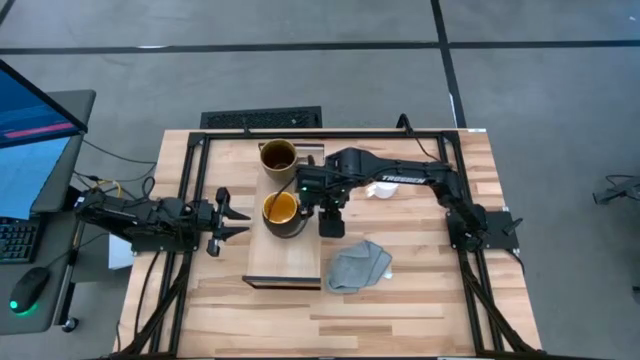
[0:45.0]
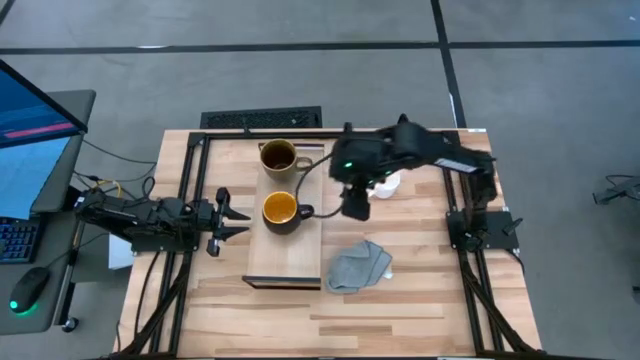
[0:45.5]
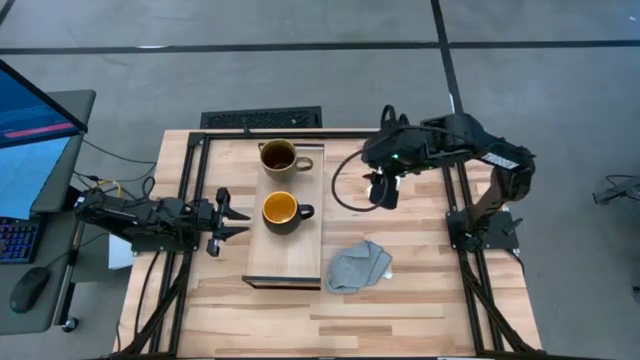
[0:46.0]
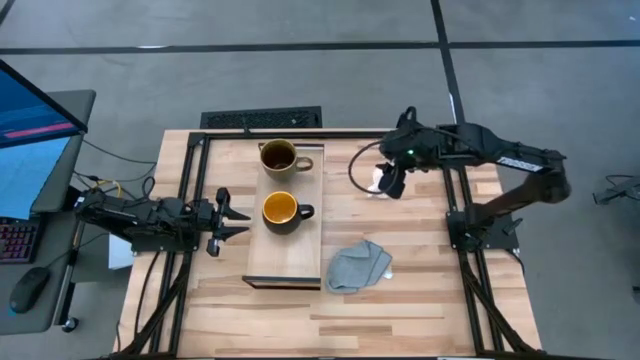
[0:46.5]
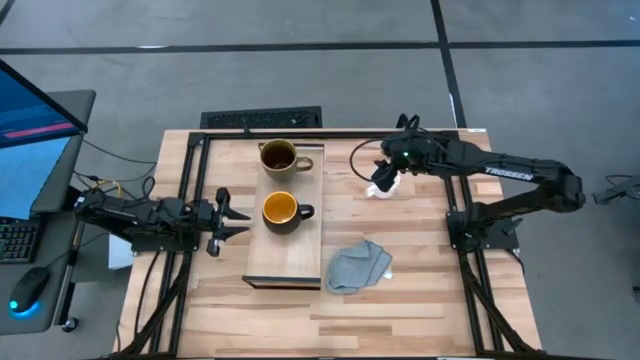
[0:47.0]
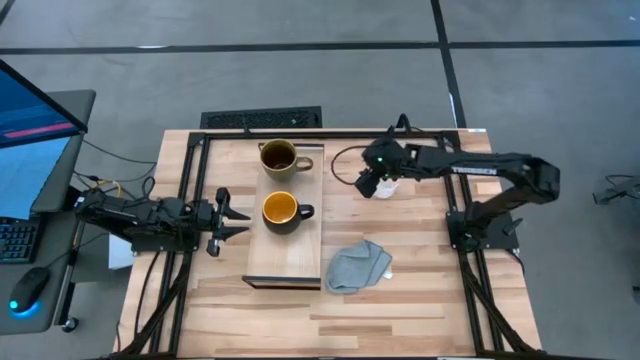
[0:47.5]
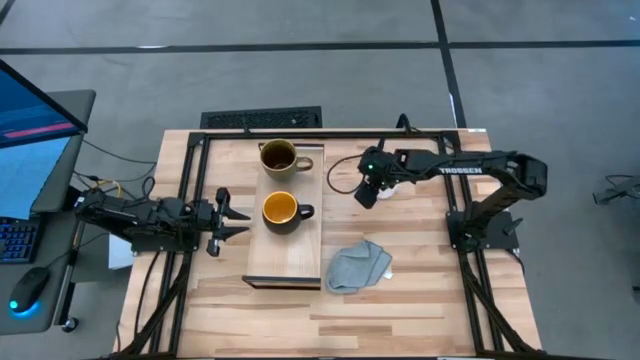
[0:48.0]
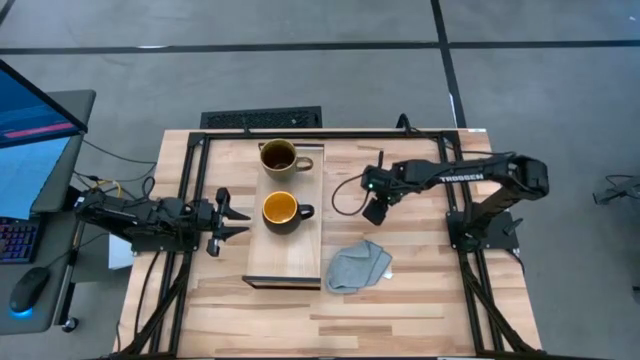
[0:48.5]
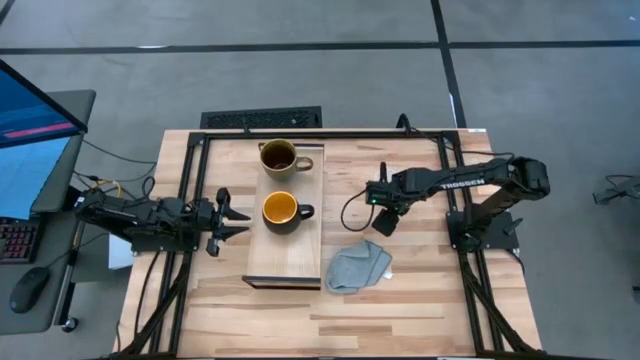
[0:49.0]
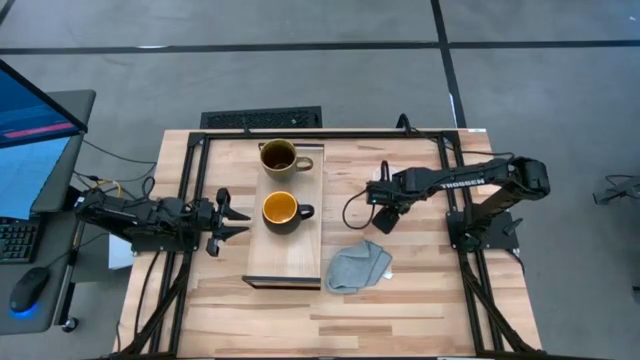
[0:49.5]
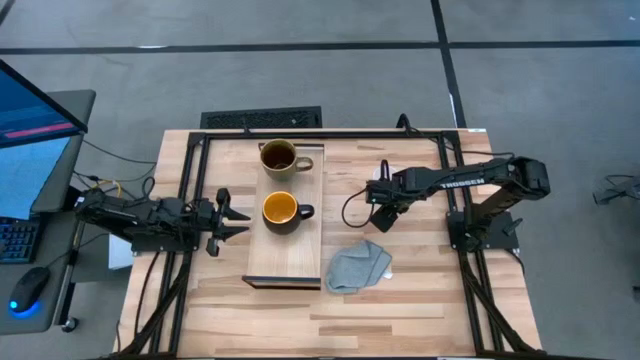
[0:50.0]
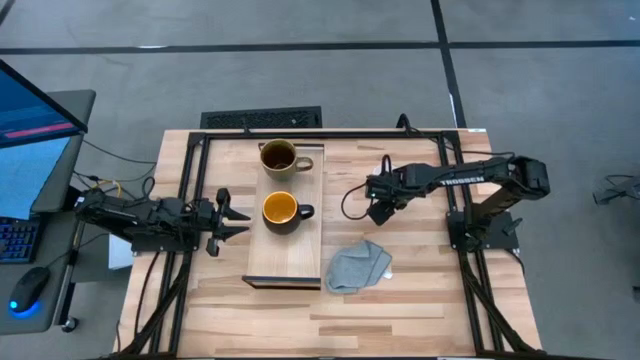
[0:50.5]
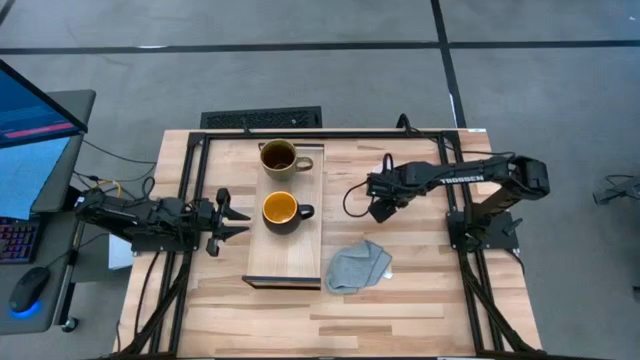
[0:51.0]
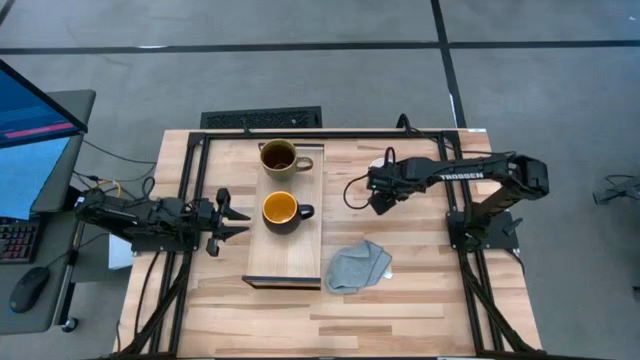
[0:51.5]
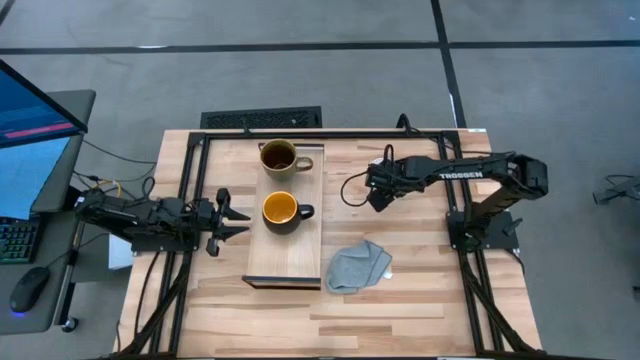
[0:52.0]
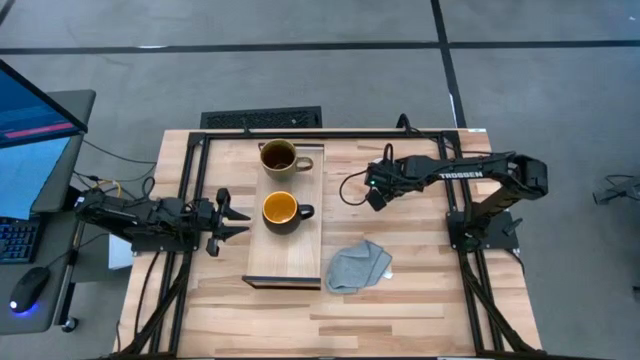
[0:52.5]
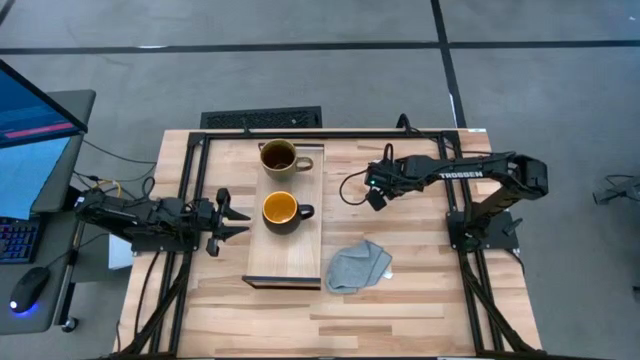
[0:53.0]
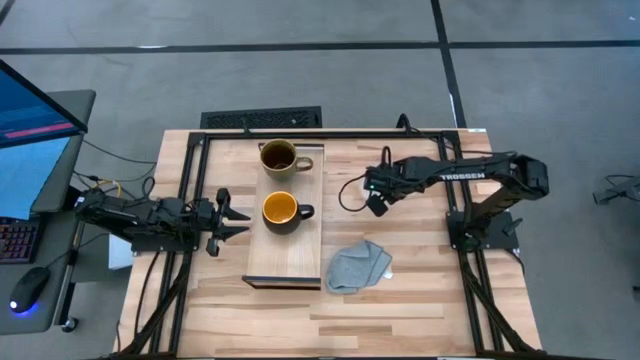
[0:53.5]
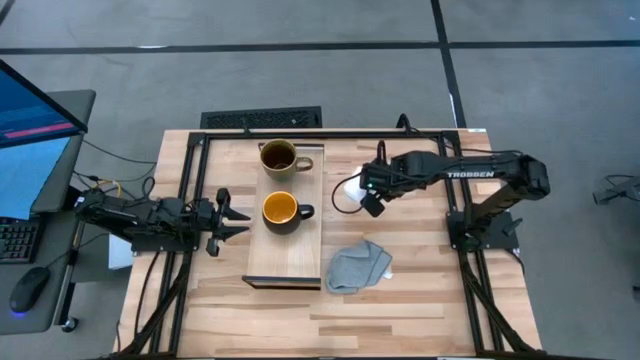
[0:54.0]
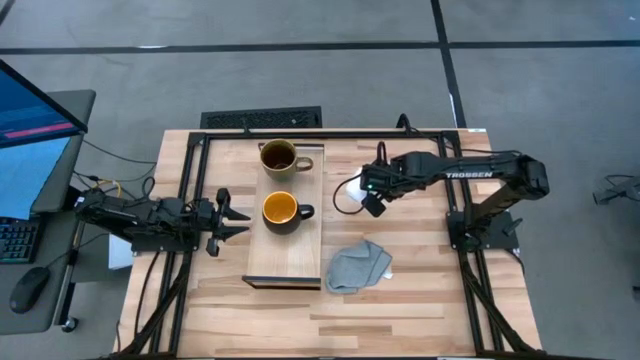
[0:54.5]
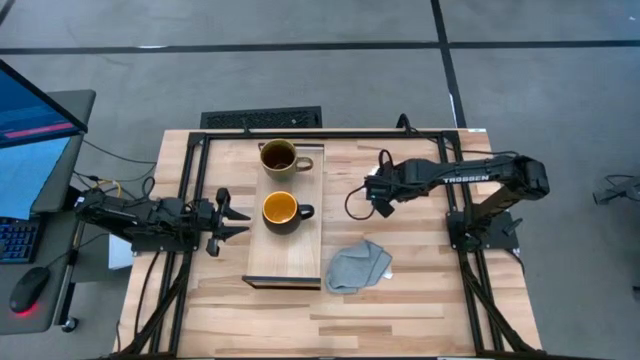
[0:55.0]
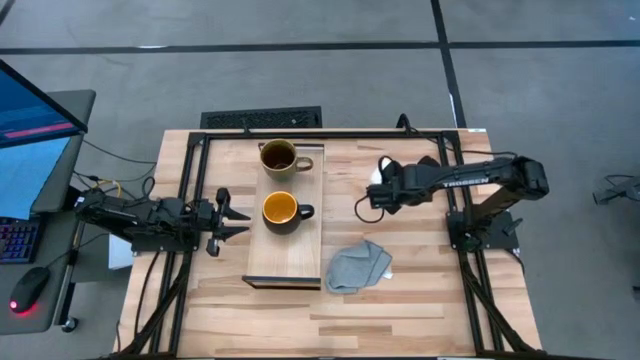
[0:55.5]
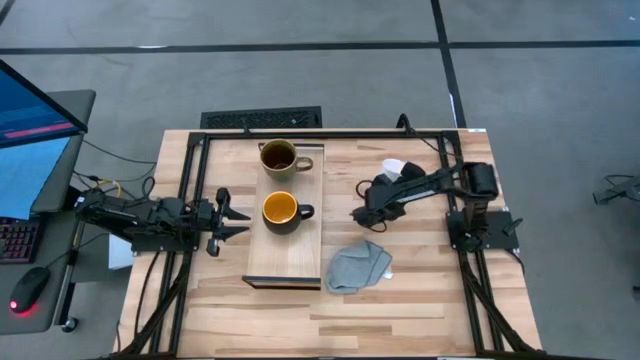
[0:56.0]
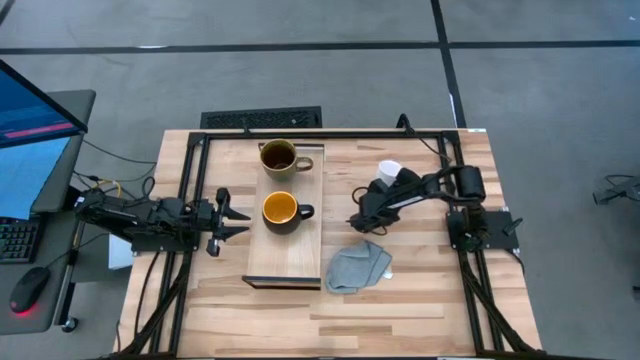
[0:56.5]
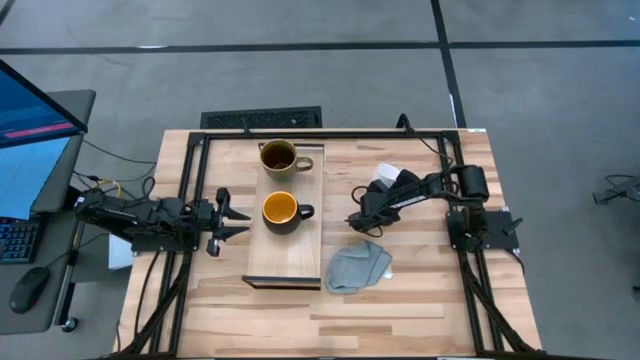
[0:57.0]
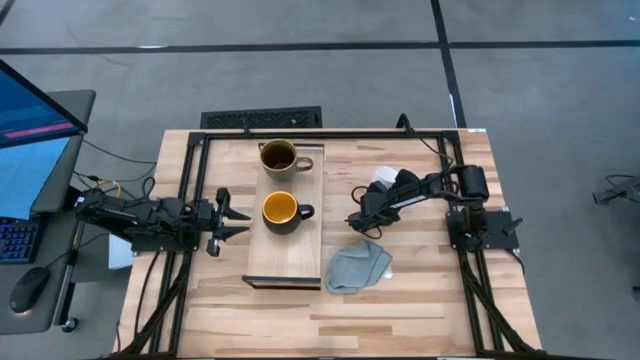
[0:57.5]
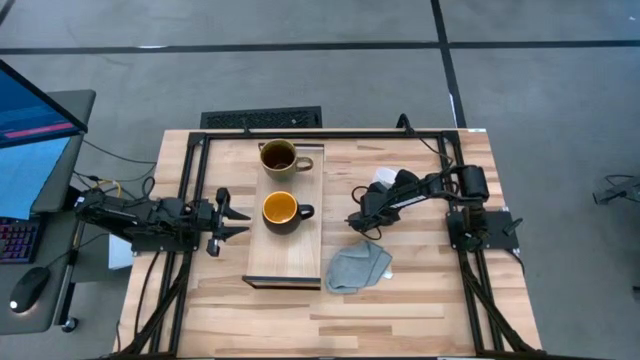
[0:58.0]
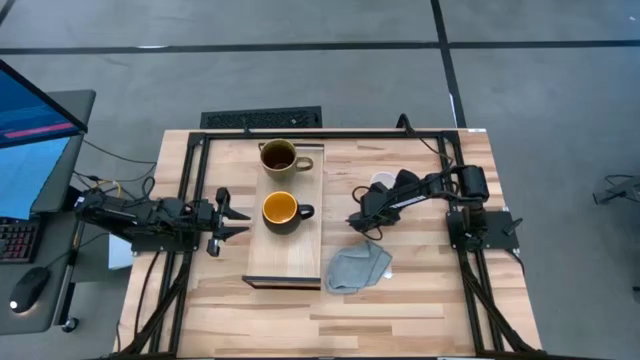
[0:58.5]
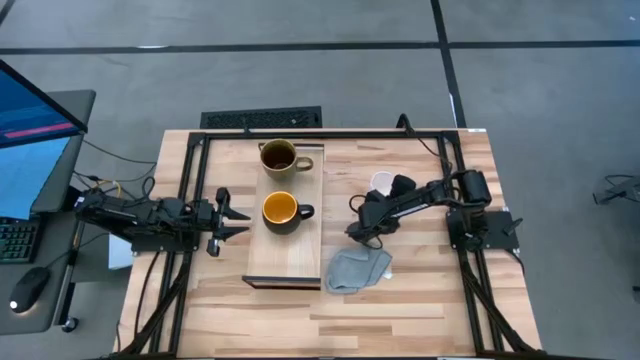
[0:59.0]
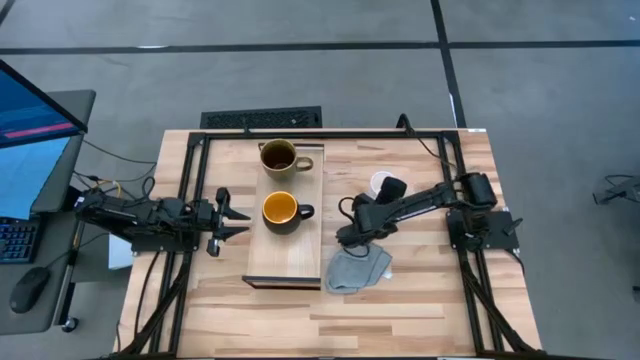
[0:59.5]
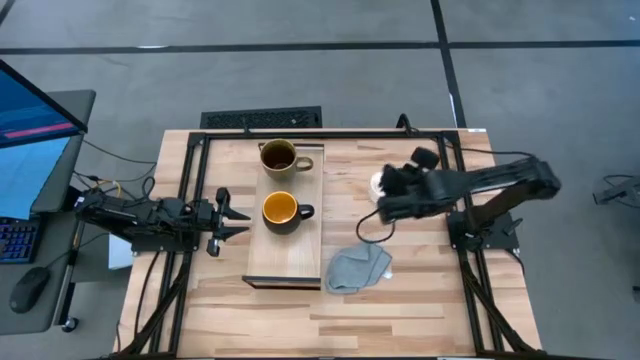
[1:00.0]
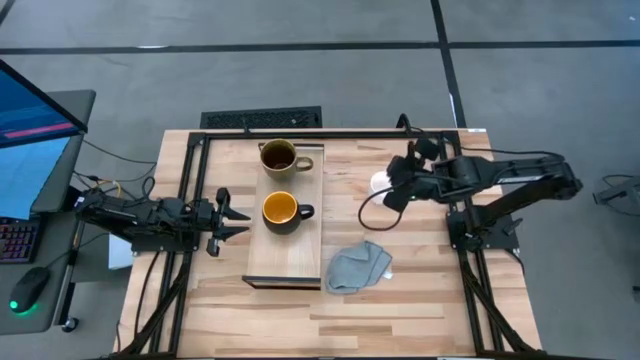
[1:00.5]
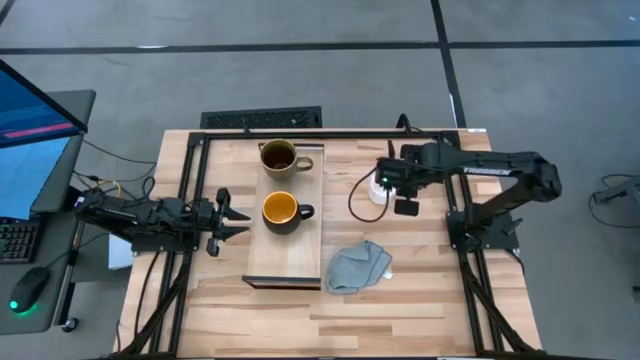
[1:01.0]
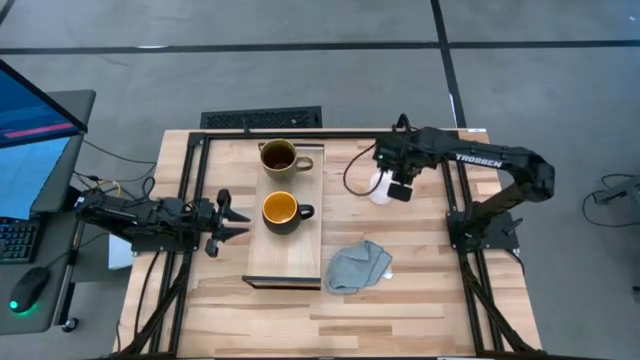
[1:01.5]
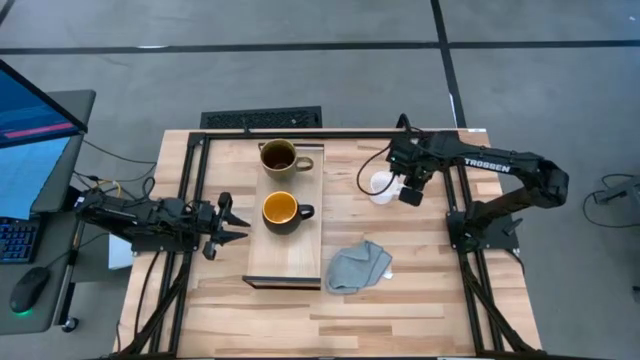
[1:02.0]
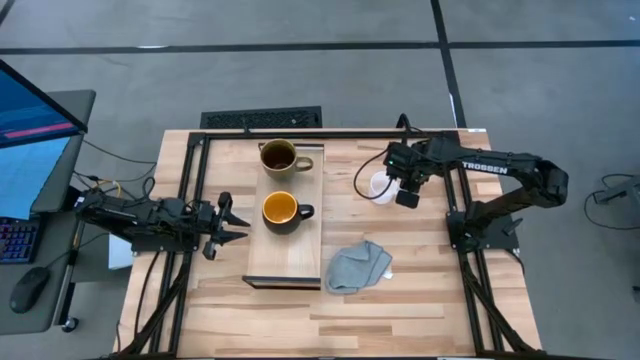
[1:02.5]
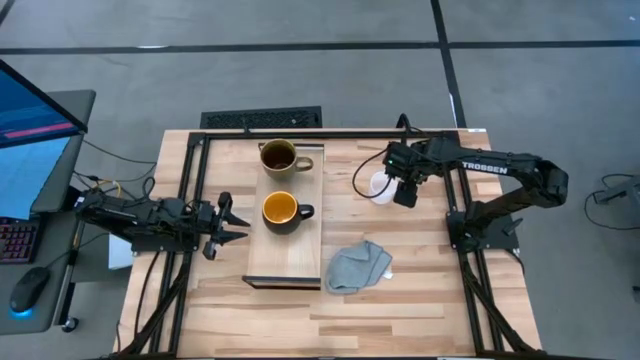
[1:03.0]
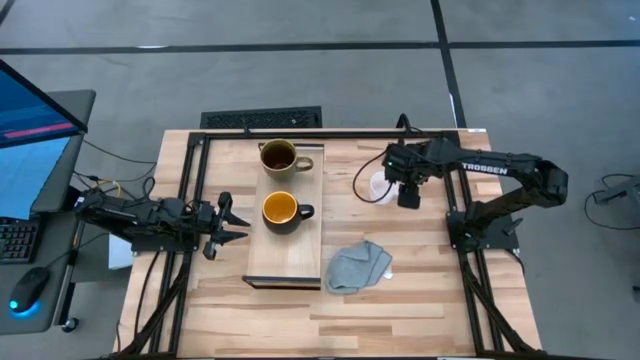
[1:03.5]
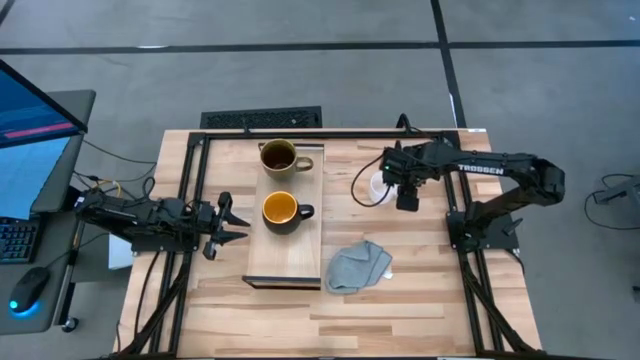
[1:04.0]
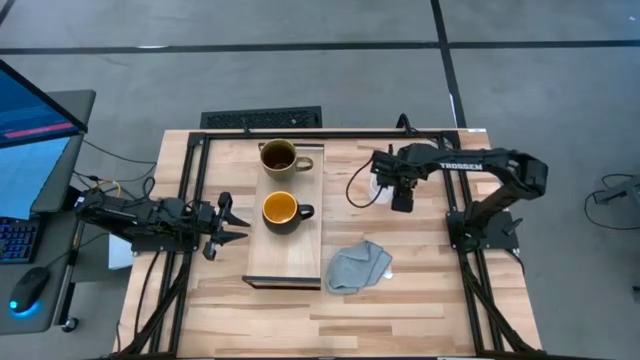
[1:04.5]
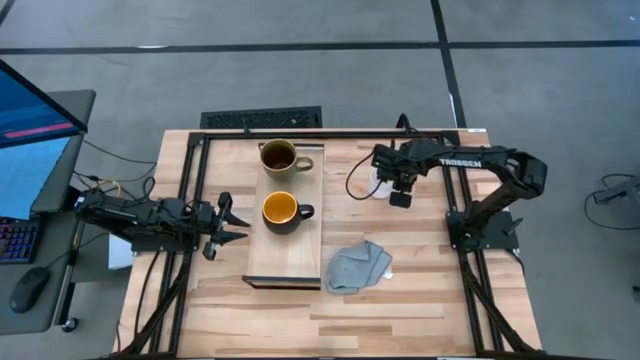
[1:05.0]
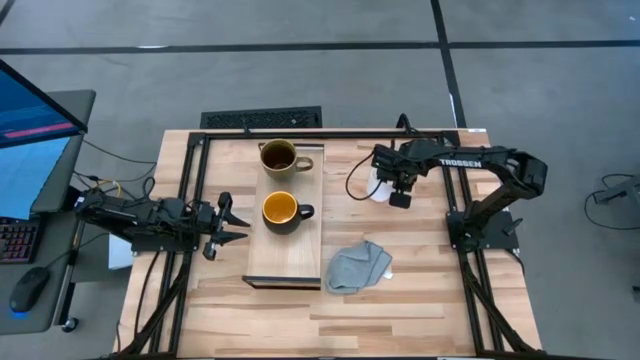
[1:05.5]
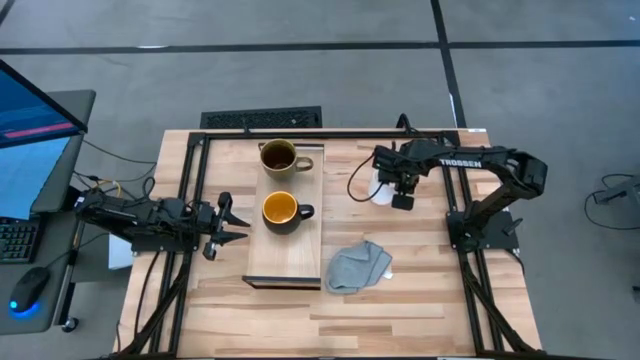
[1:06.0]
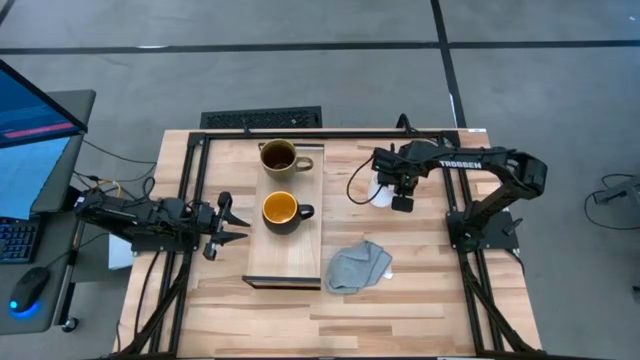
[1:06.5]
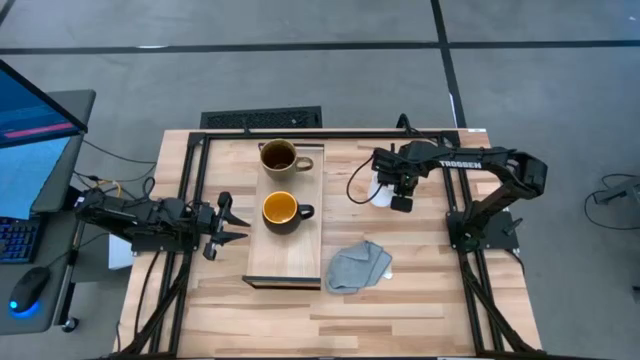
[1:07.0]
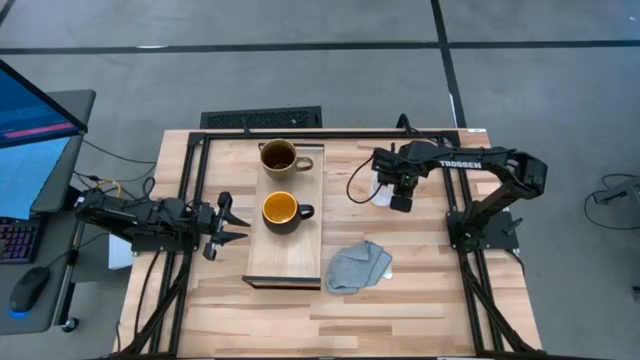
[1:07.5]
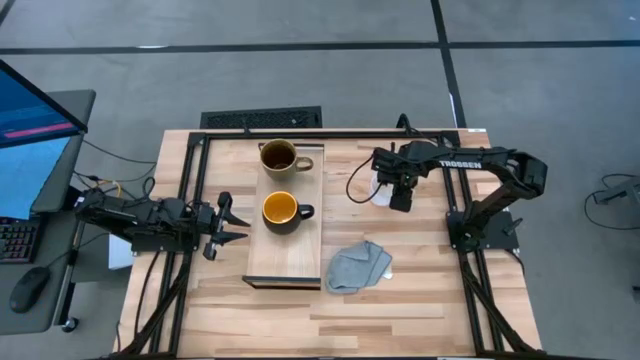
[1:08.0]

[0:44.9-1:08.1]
Task: Stack small to large cups/mugs on shelf
Put the white mug on the shelf
